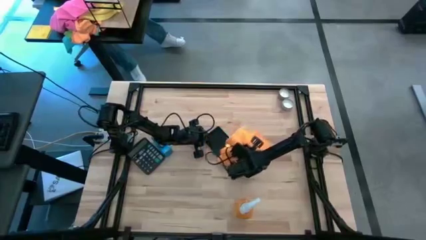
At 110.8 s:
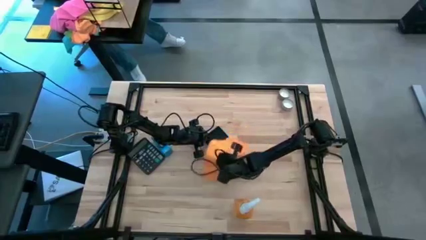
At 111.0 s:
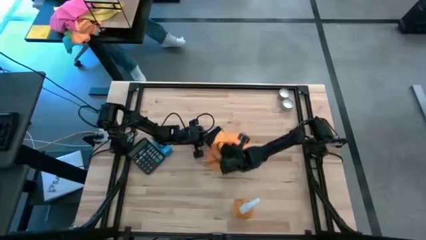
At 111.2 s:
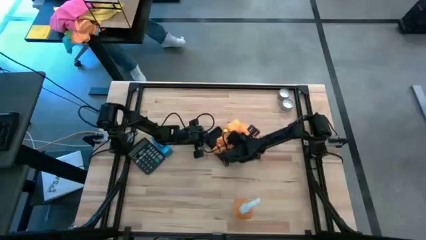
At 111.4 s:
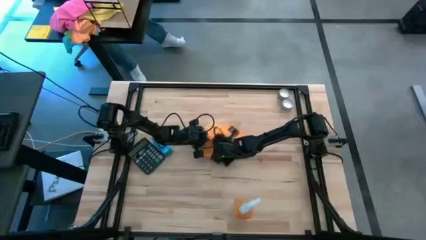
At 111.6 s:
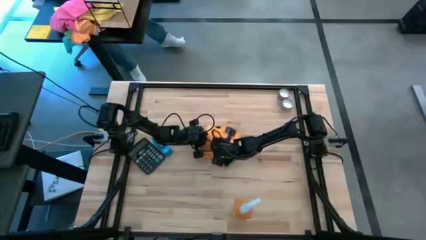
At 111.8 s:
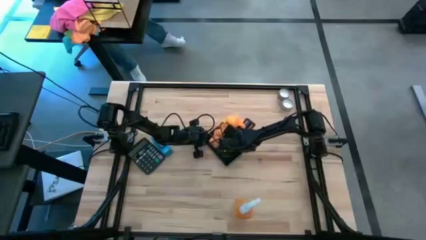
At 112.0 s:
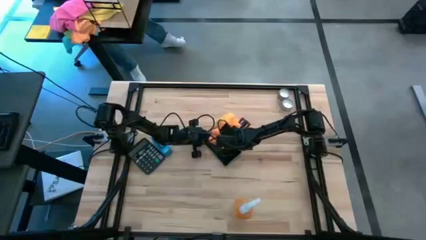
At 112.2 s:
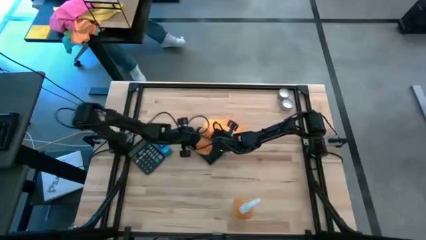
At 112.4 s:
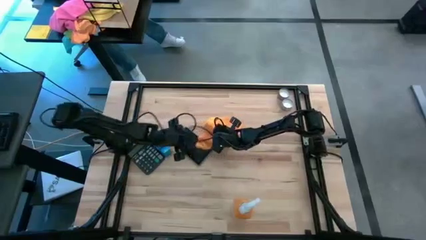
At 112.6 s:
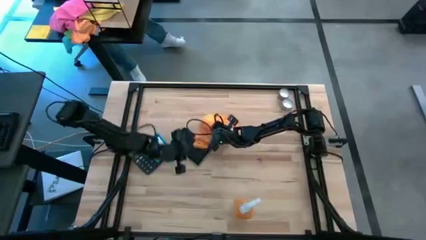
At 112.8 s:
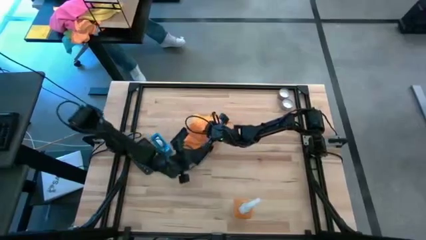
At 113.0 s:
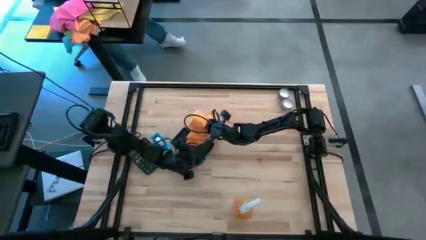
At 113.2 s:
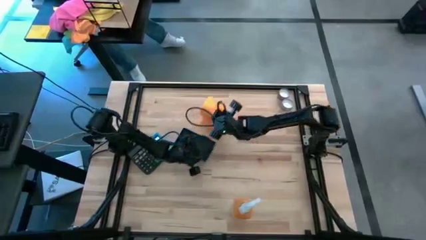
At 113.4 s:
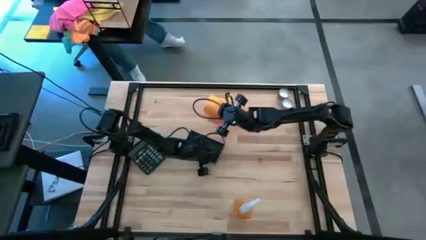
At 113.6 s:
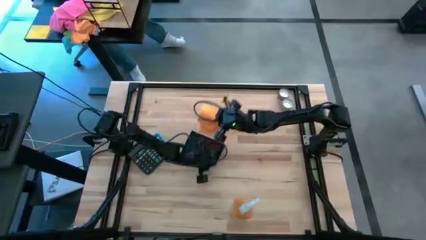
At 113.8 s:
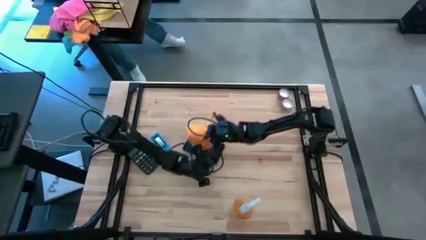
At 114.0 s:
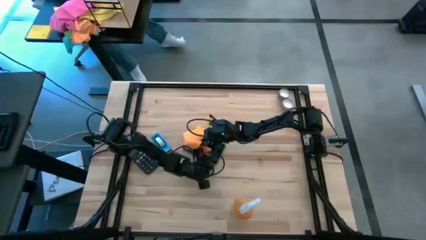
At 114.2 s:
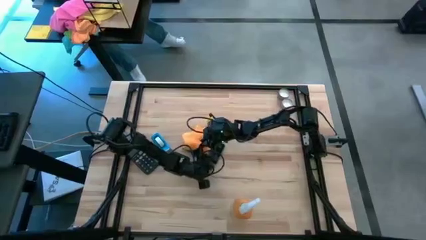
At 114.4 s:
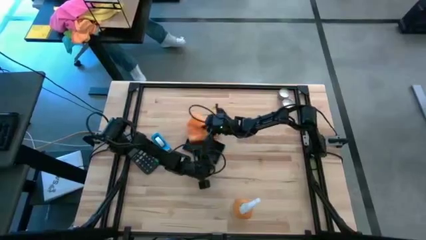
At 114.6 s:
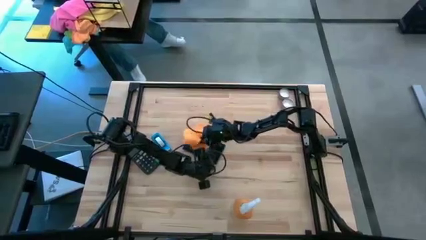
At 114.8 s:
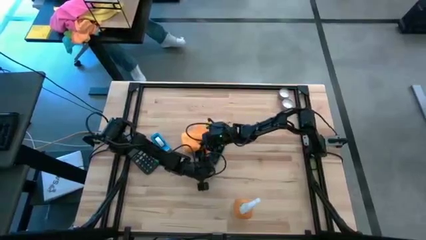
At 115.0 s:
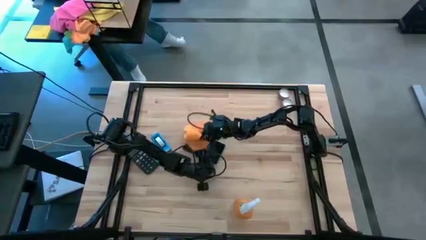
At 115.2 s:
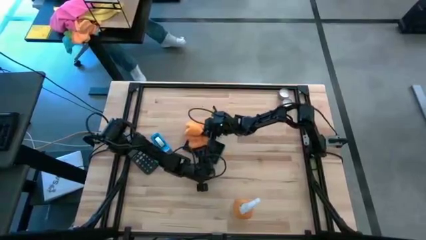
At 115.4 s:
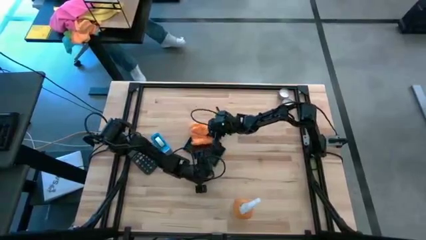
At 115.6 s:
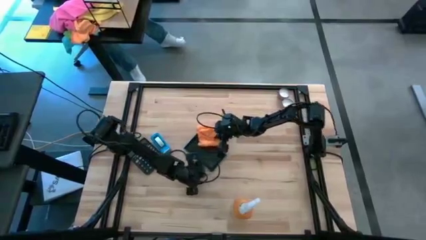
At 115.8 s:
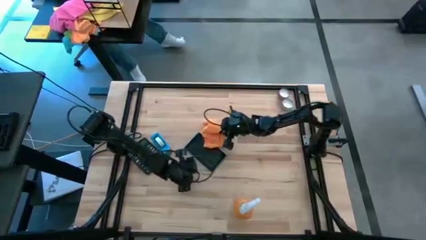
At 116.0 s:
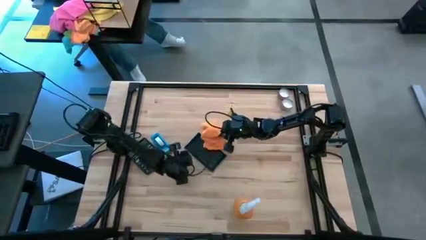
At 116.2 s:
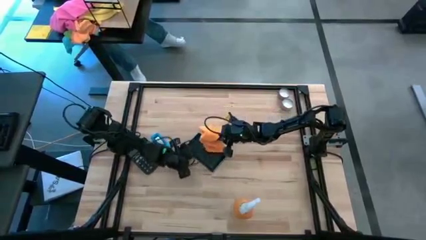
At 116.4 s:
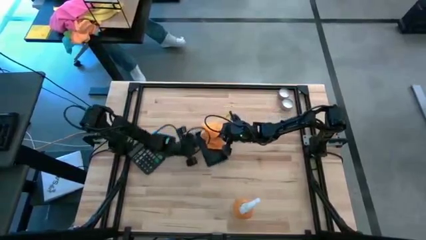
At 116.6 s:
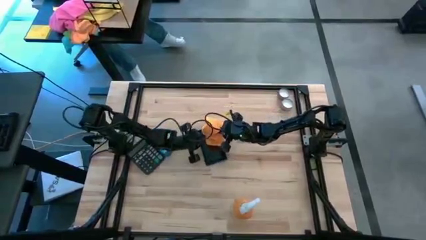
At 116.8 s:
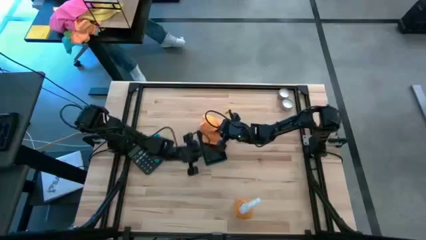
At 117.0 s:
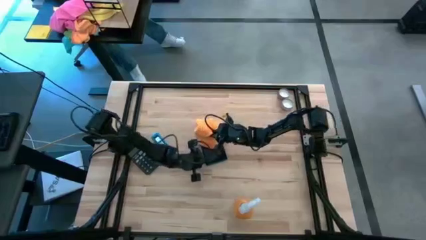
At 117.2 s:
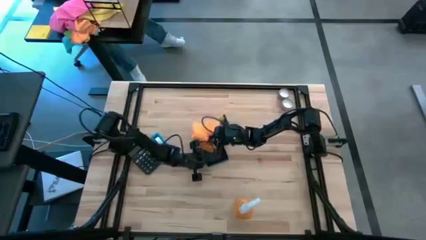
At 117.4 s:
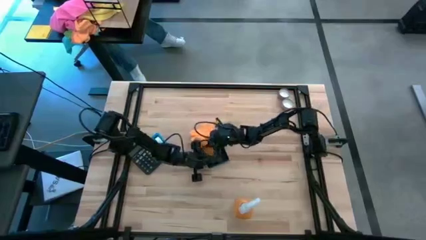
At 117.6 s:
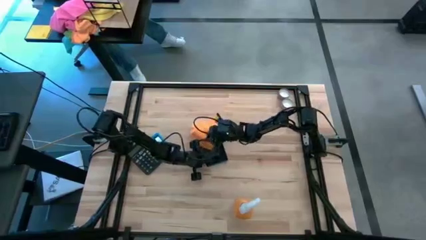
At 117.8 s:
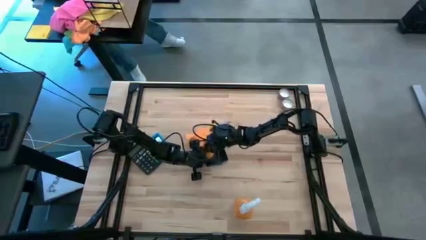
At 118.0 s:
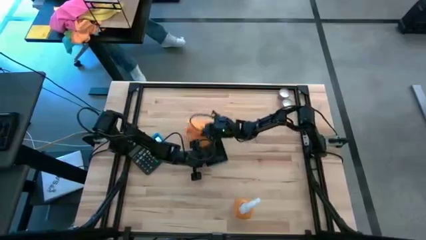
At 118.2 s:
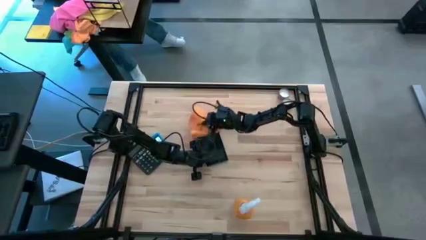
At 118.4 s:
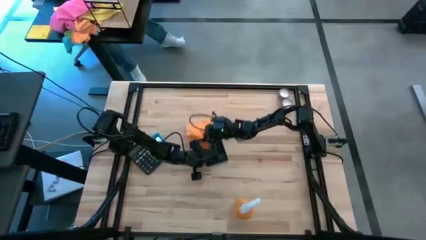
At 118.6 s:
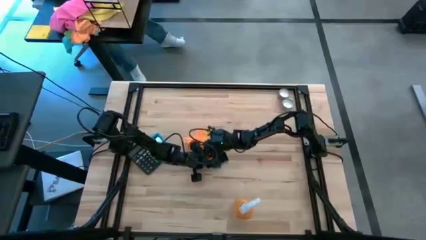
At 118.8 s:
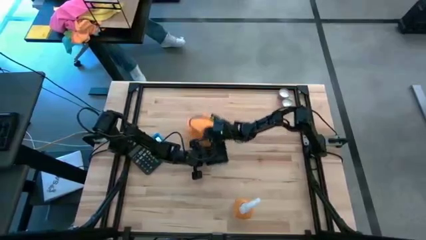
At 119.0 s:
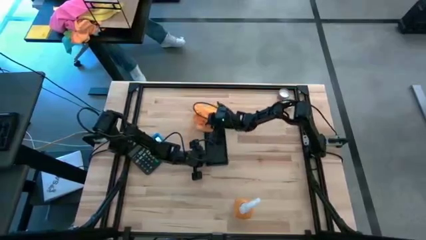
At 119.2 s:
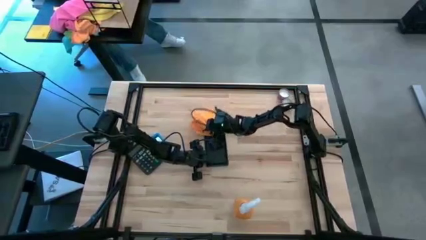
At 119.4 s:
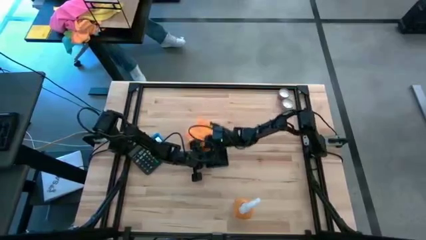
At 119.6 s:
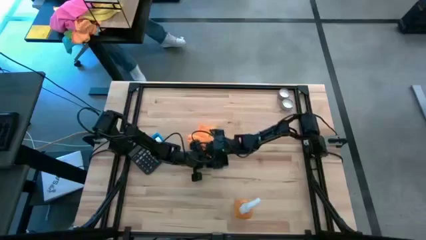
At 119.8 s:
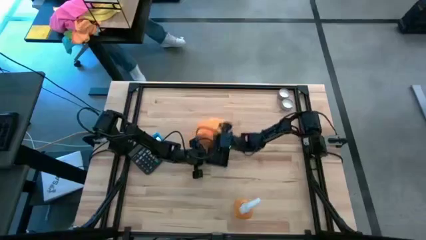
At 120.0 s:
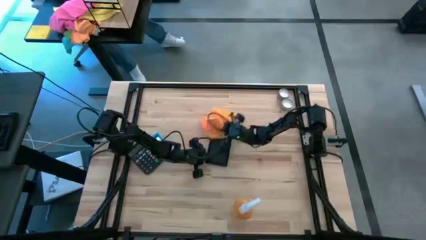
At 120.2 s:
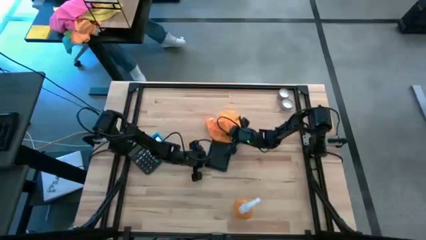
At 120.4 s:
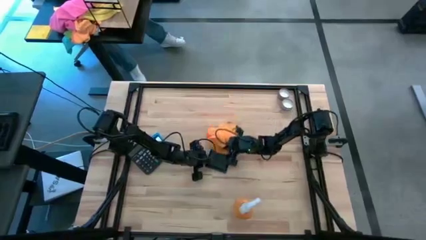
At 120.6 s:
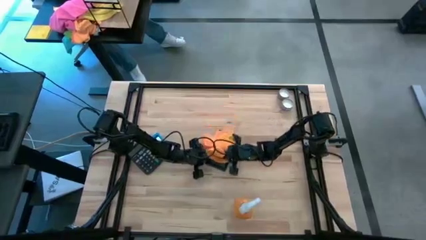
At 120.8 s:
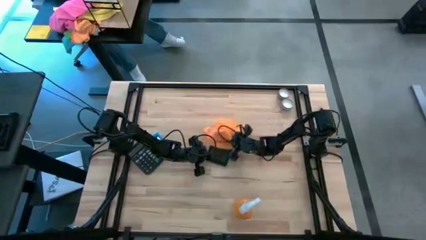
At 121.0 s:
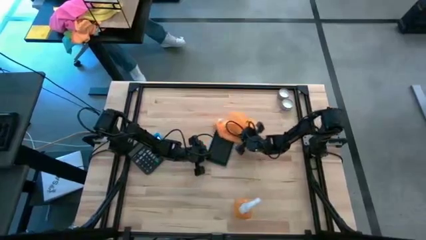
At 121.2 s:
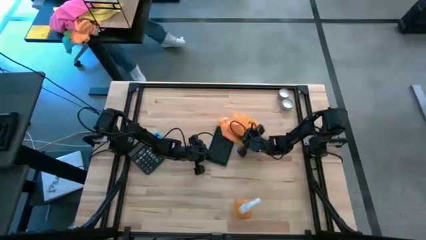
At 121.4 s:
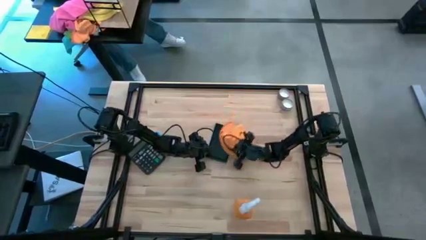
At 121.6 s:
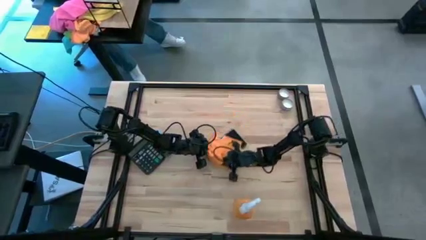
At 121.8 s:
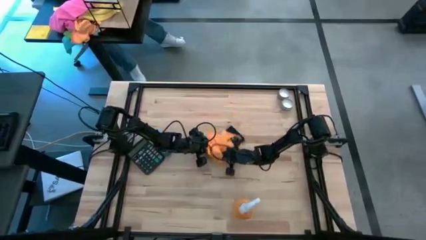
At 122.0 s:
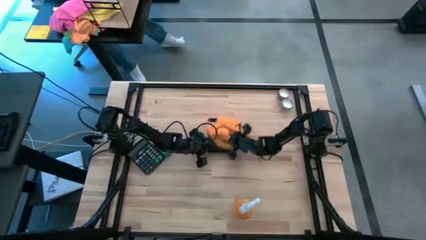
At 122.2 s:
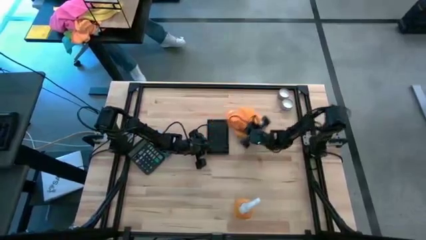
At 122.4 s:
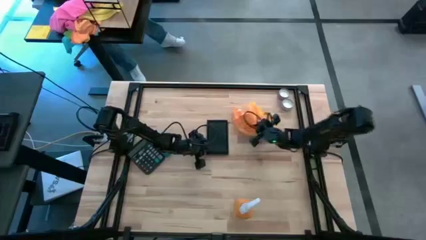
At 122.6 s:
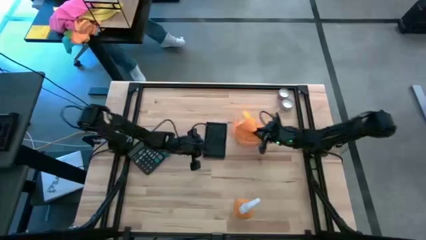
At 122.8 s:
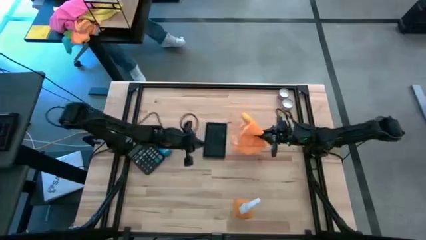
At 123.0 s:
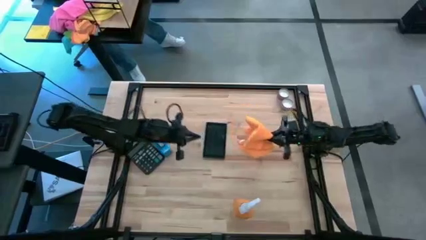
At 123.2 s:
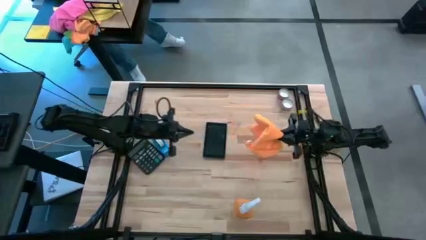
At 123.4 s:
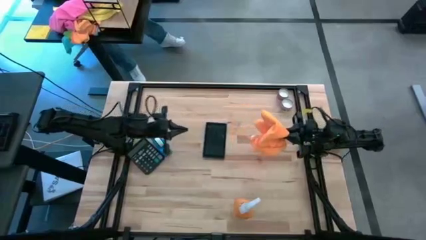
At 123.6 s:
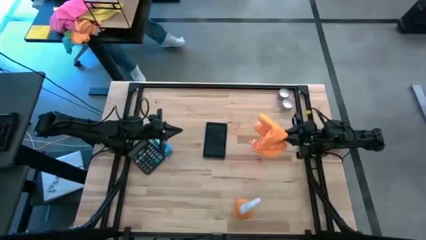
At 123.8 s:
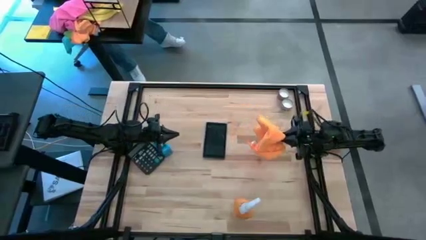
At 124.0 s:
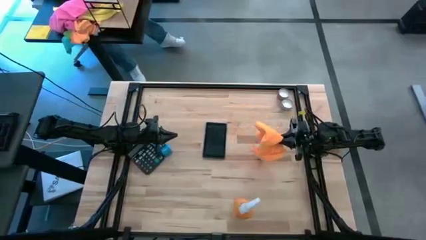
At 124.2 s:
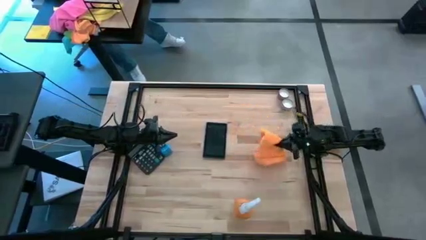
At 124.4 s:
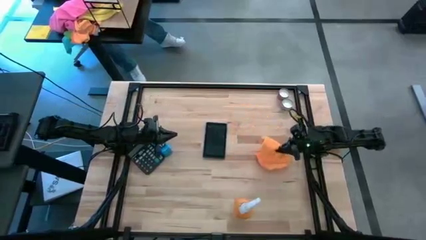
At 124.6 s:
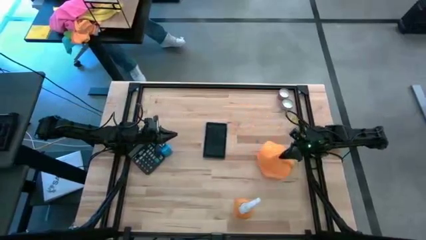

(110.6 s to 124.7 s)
Task: Apply microfiber cloth
Wipe the back of the blue phone with the orange microfiber cloth

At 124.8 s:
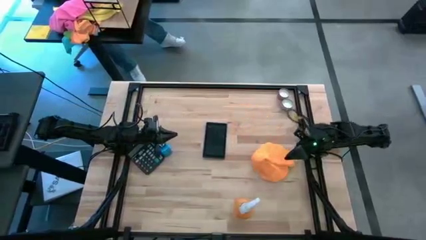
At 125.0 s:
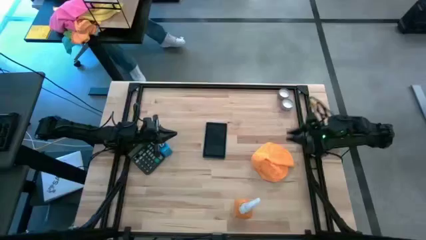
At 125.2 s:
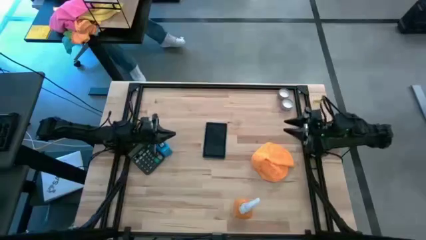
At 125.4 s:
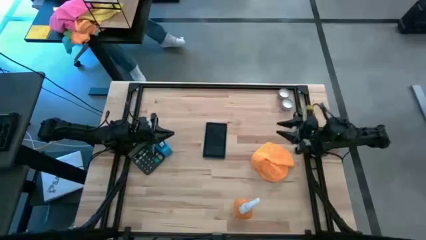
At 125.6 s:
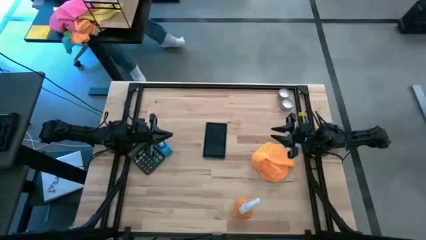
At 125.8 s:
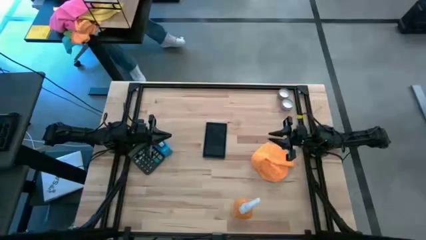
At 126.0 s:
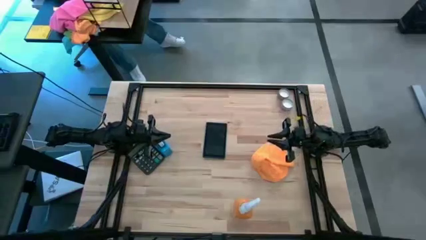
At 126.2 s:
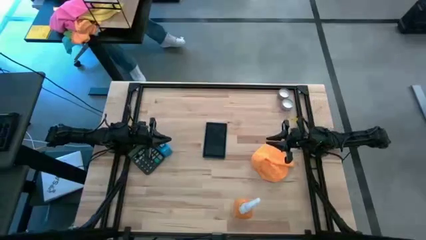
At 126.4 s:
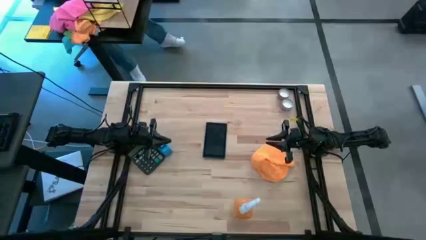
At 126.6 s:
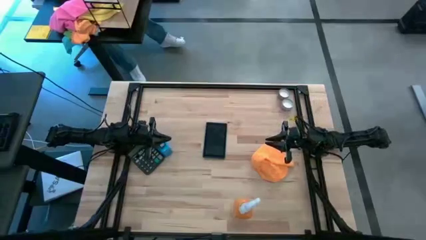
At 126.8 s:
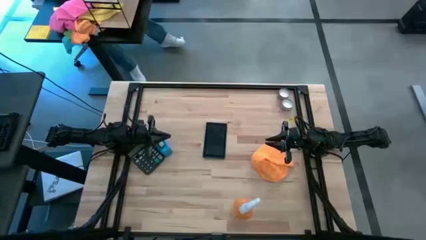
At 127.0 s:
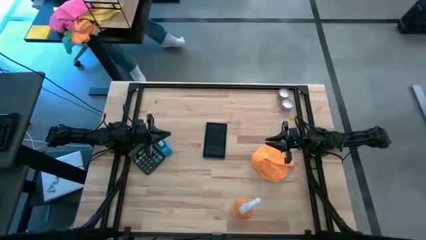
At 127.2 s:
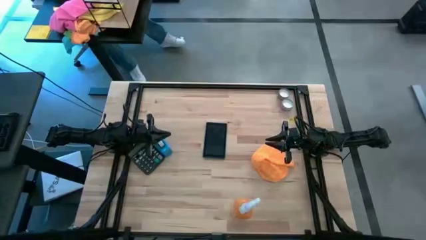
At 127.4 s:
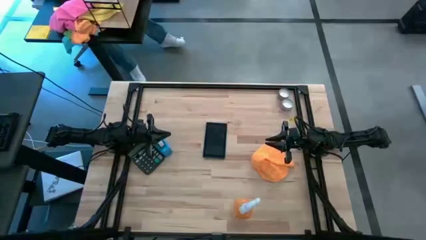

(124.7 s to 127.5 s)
Return to Home Position
